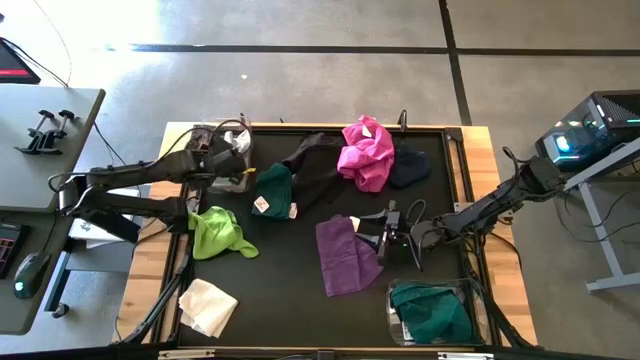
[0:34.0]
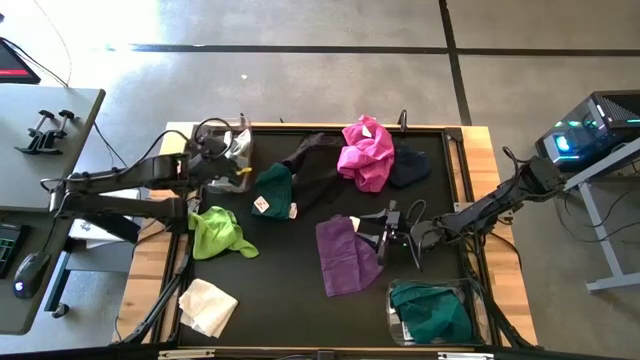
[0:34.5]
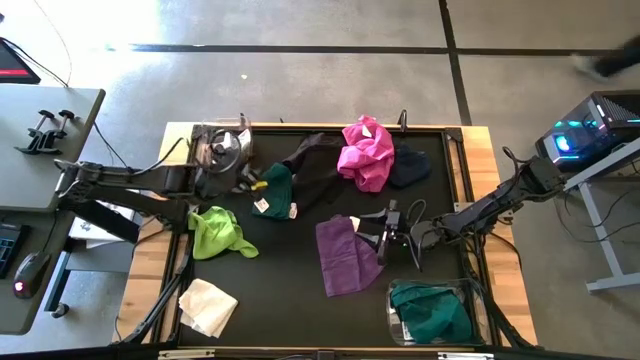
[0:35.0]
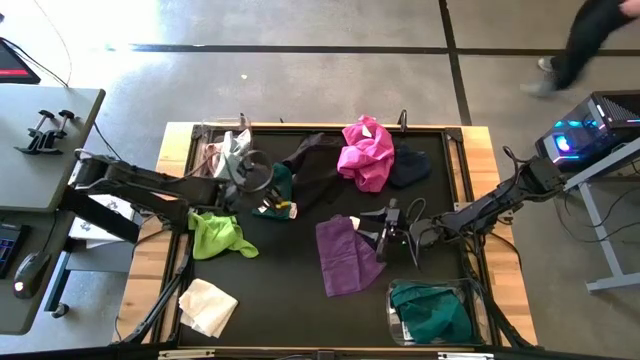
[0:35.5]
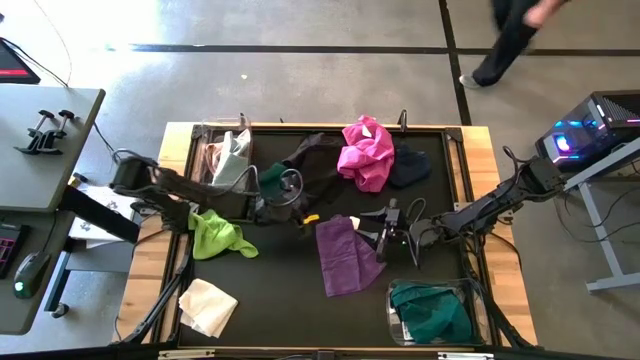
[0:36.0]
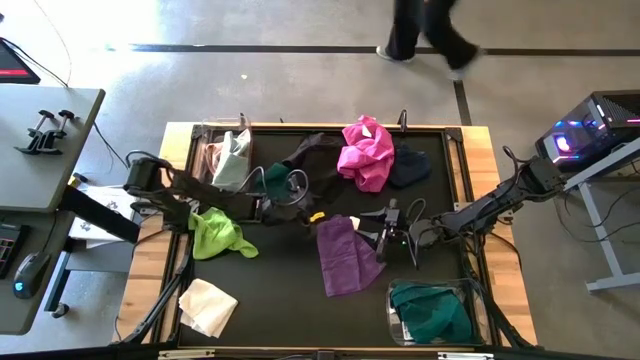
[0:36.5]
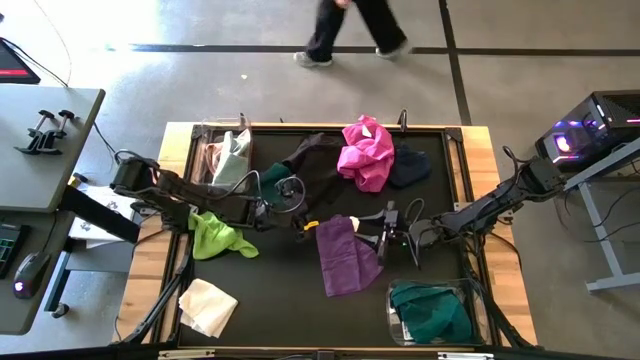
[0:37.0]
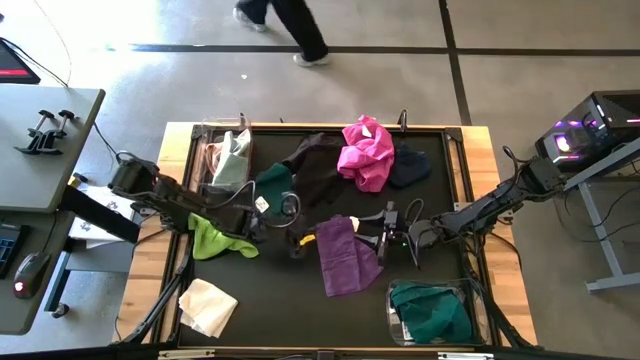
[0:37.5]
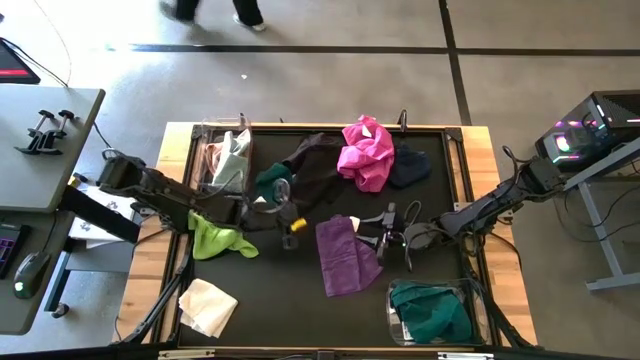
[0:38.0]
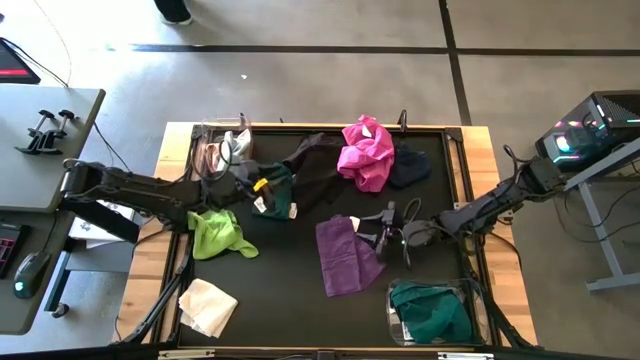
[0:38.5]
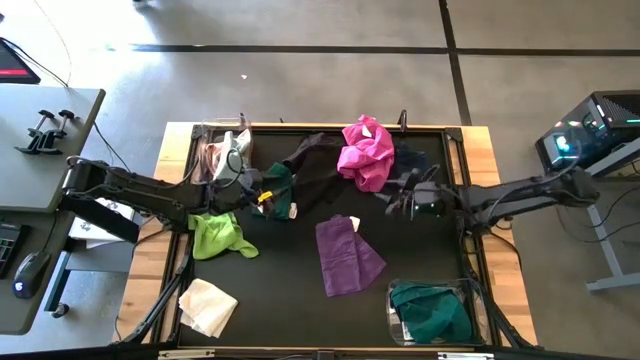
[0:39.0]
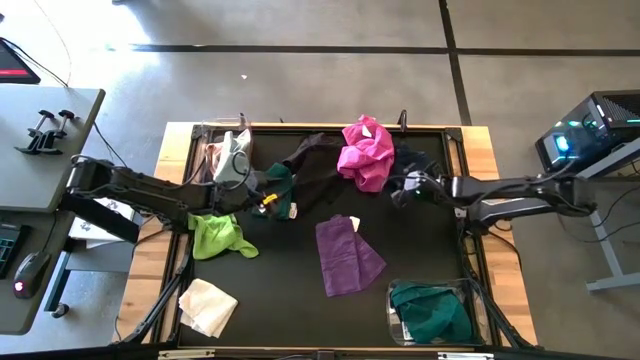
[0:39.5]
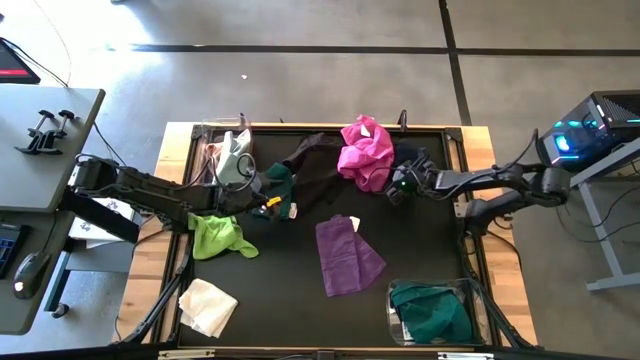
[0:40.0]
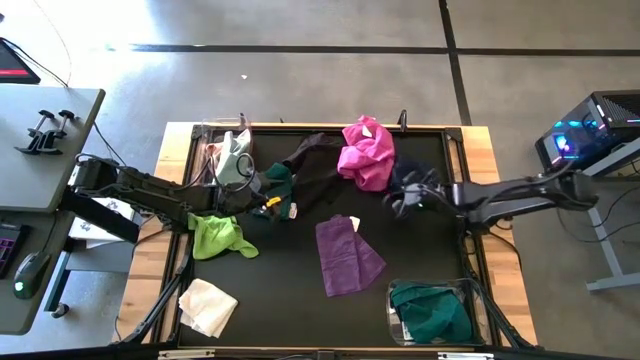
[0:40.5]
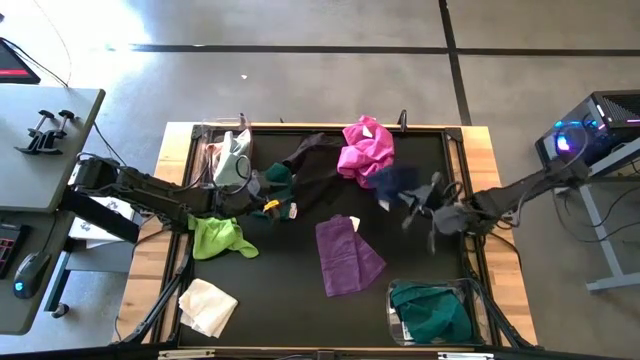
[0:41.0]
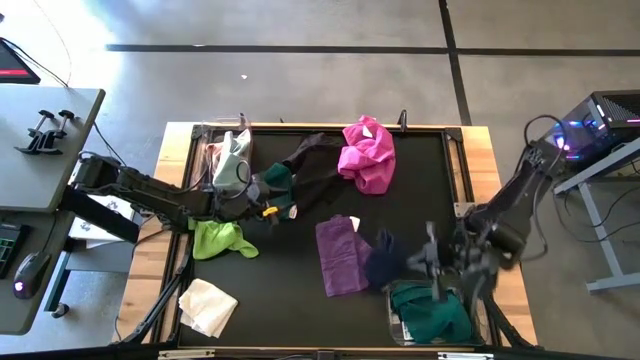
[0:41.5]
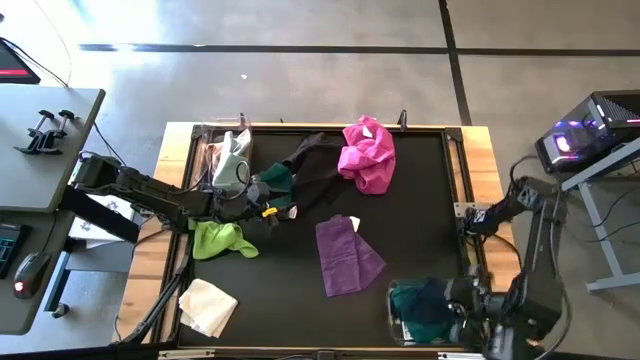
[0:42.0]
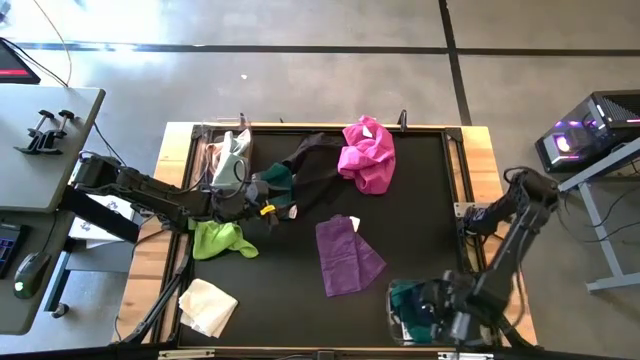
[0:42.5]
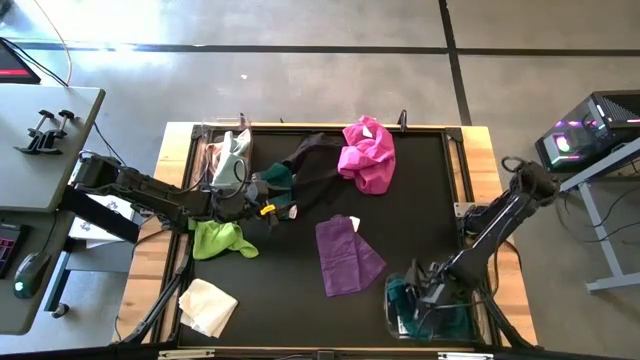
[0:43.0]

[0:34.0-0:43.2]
Task: Sort towels by color in basket
Put the blue towel into the bottom transparent bin

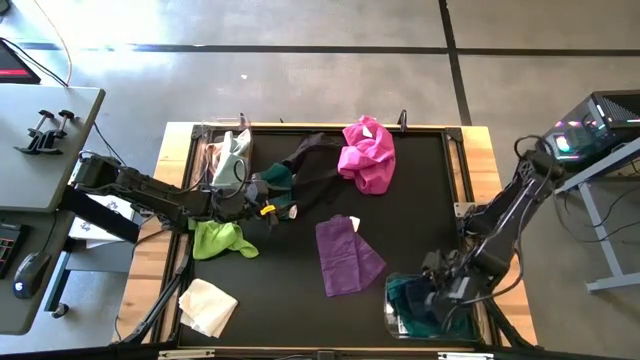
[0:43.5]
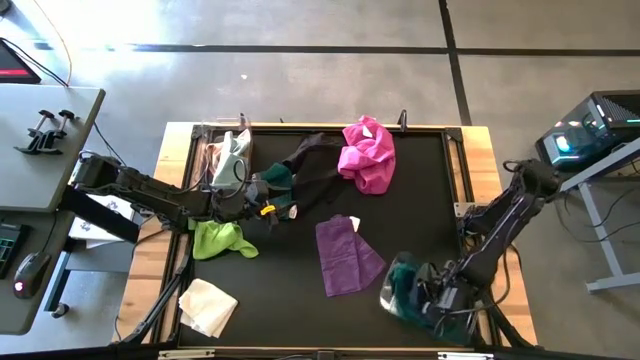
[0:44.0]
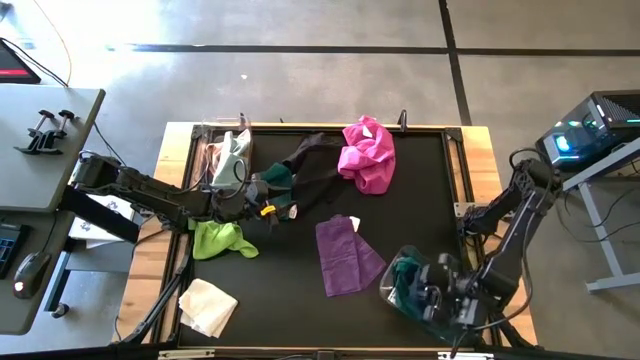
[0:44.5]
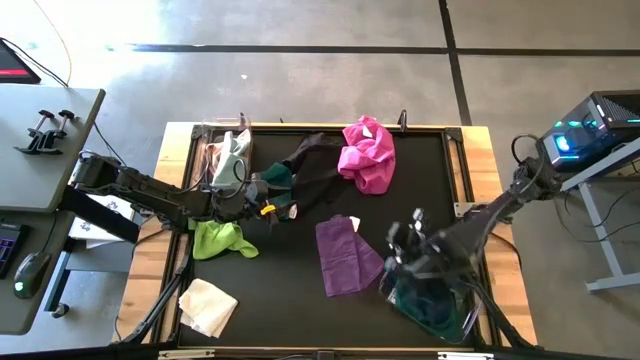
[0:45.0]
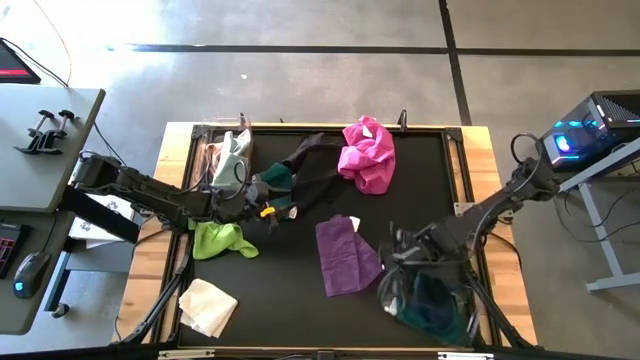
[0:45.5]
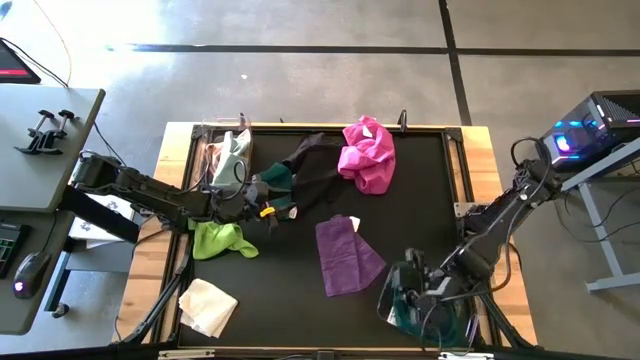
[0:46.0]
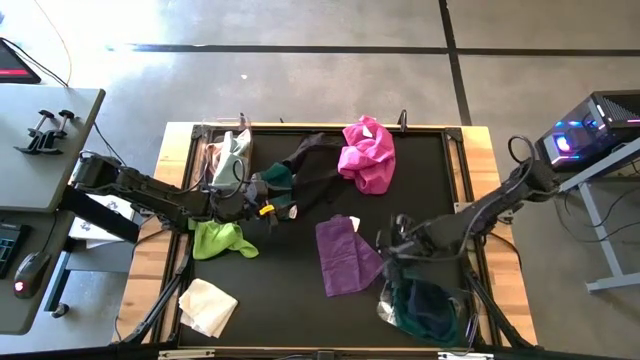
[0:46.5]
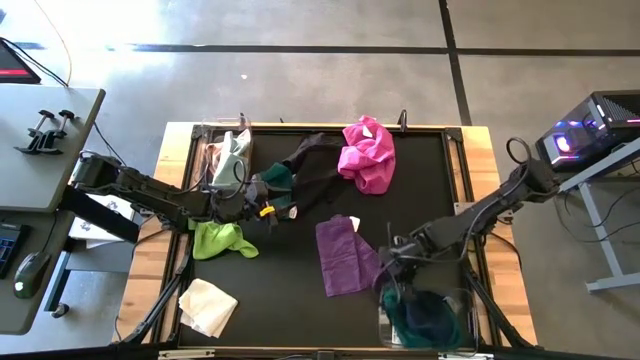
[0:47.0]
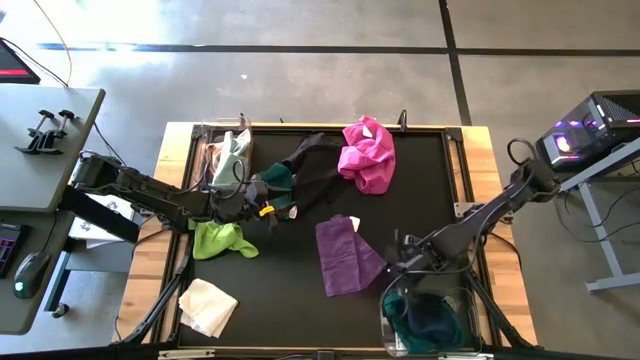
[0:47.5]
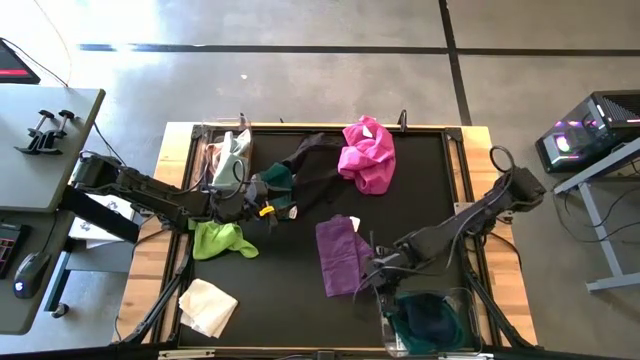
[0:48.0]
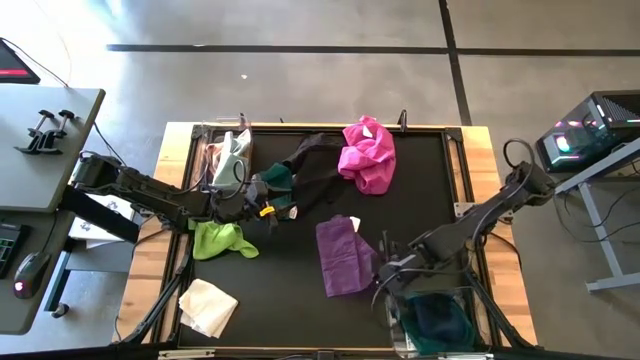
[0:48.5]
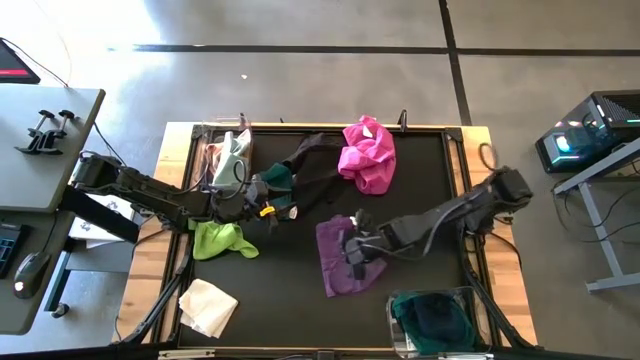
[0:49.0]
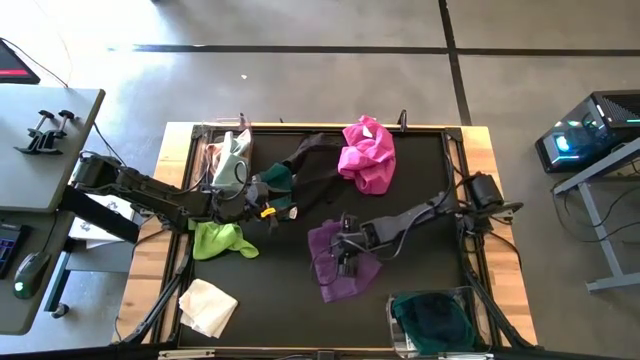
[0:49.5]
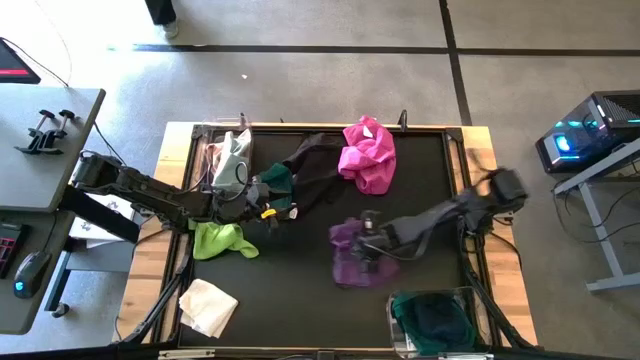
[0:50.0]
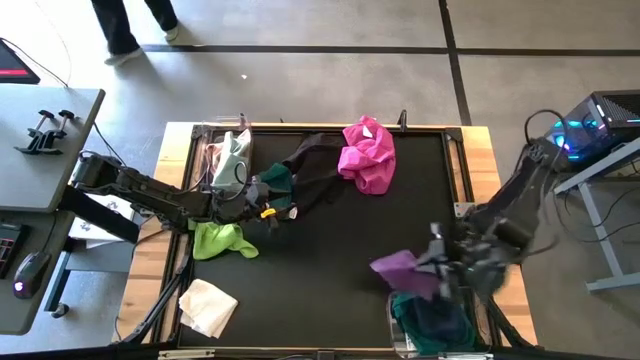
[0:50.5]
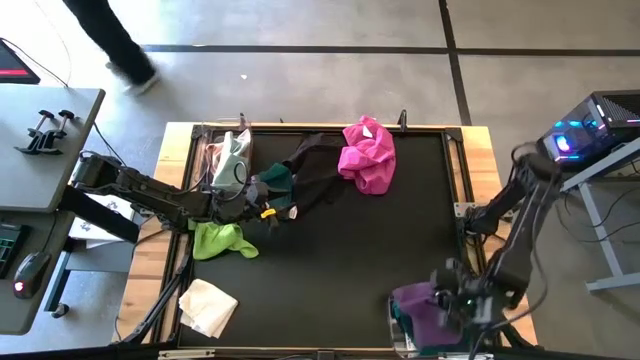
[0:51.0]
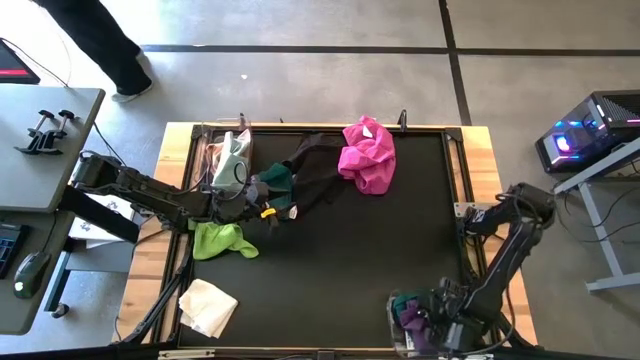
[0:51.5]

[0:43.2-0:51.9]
Put the violet towel into the bottom transparent bin

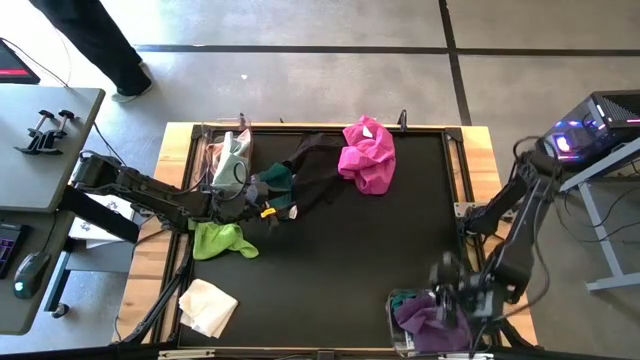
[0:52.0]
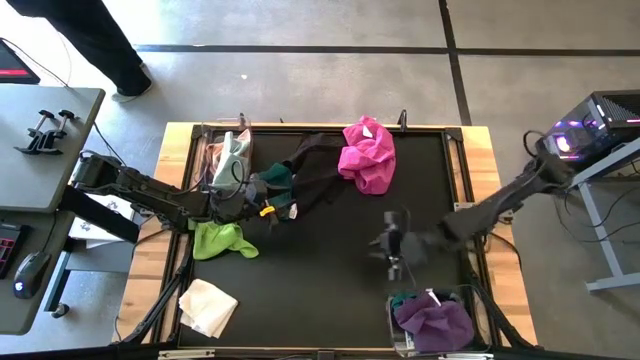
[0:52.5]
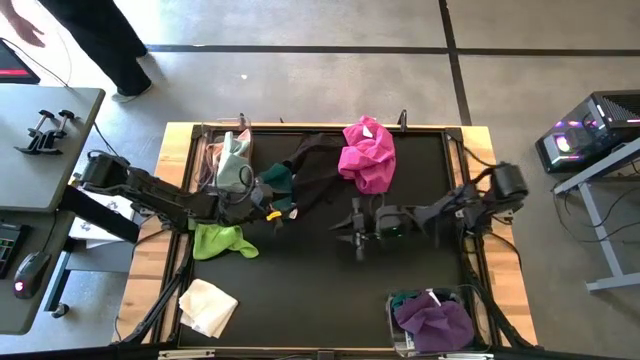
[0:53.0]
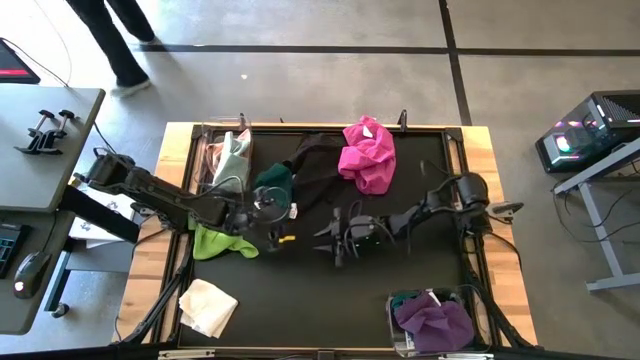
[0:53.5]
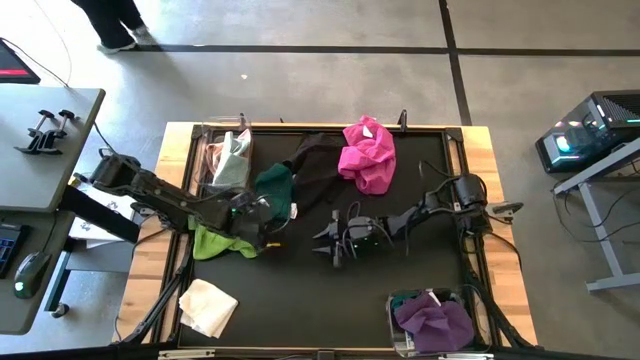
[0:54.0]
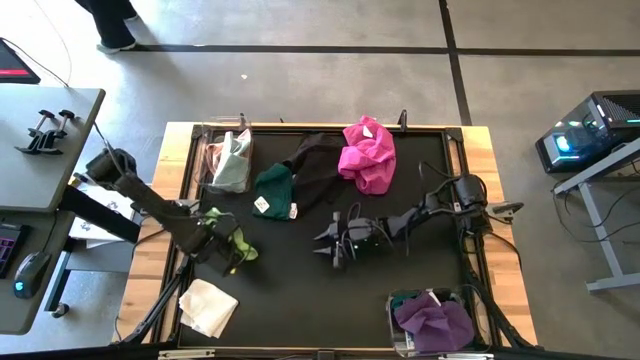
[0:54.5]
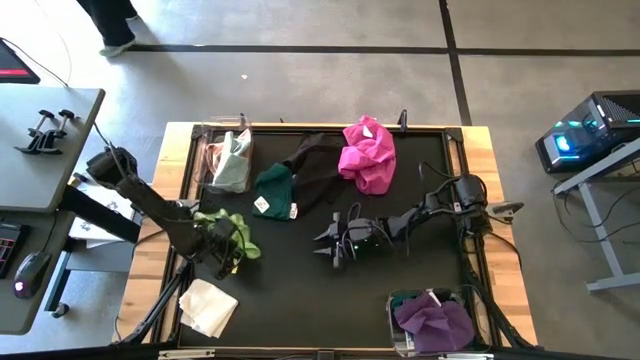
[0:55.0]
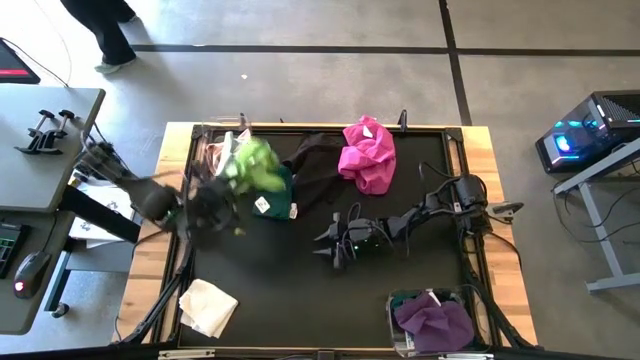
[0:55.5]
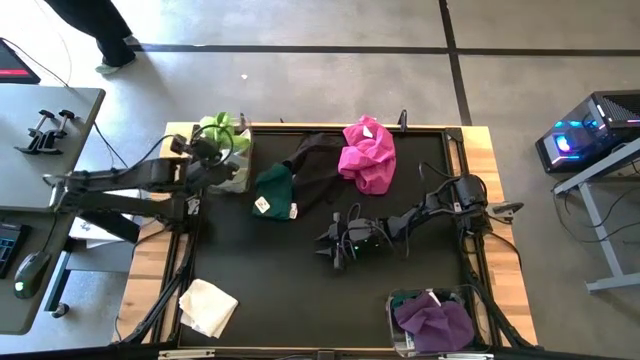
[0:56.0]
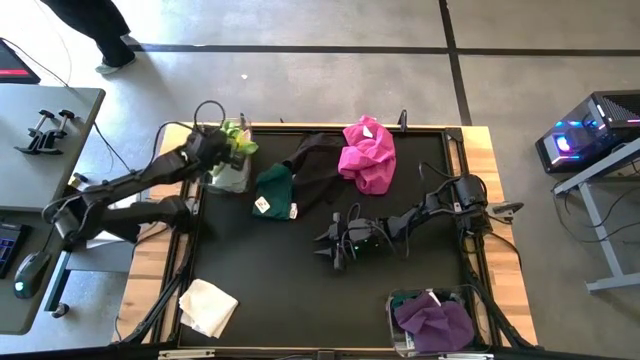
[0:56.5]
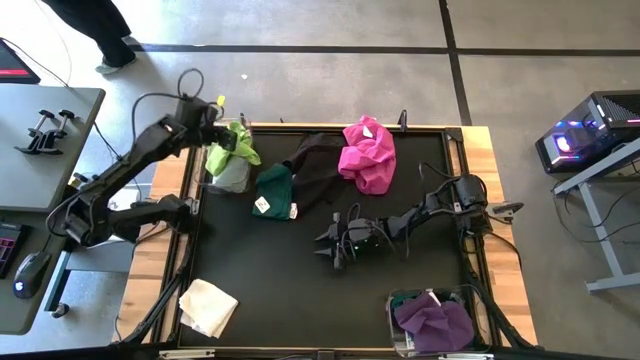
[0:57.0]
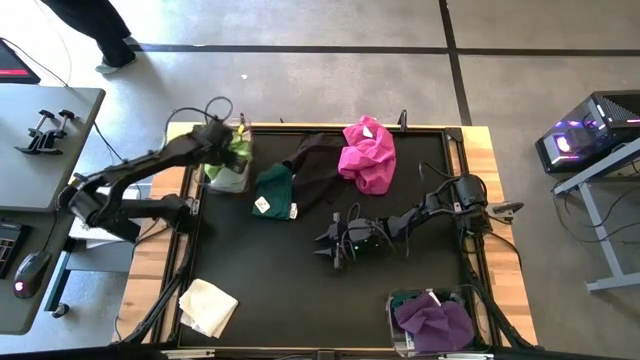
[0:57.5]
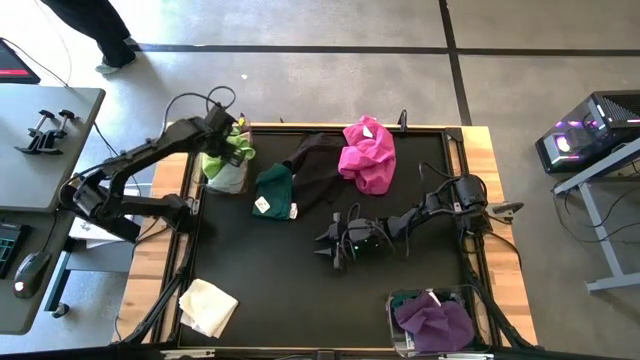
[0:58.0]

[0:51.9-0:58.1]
Put the light green towel into the top transparent bin
